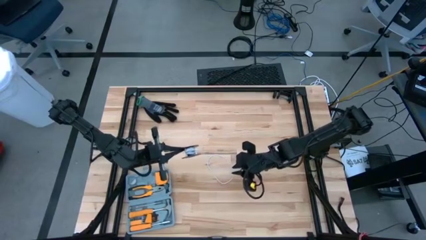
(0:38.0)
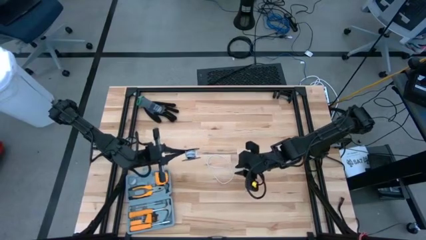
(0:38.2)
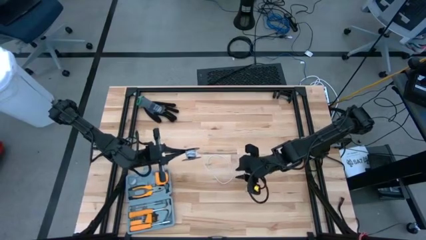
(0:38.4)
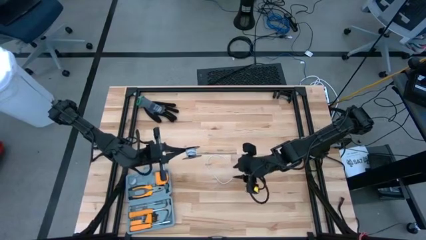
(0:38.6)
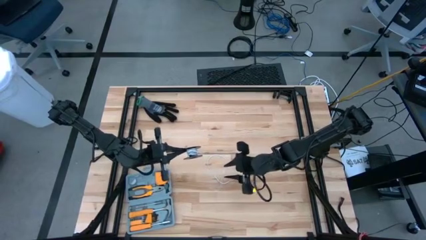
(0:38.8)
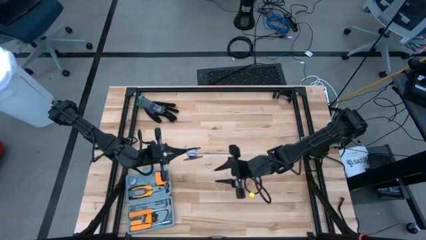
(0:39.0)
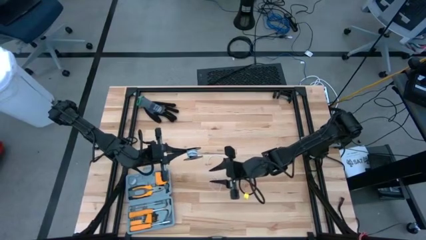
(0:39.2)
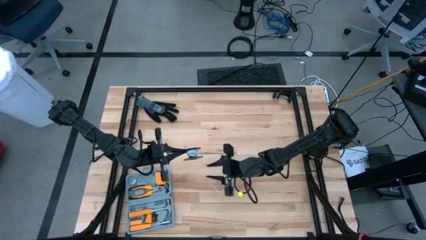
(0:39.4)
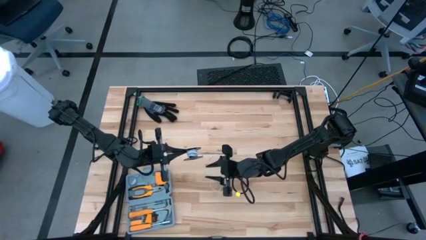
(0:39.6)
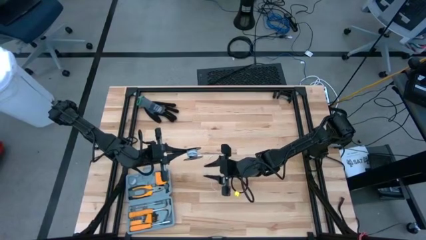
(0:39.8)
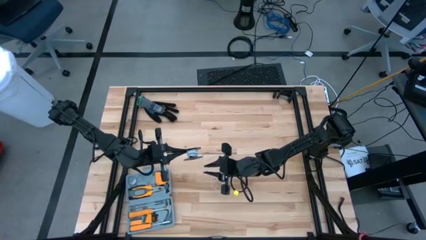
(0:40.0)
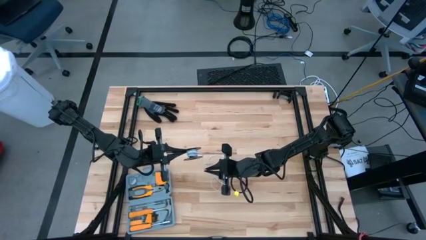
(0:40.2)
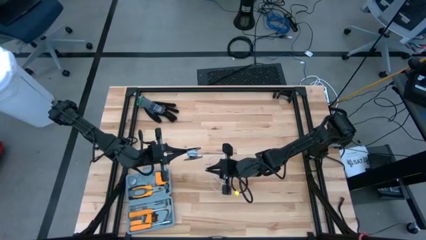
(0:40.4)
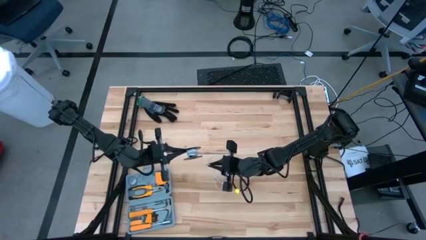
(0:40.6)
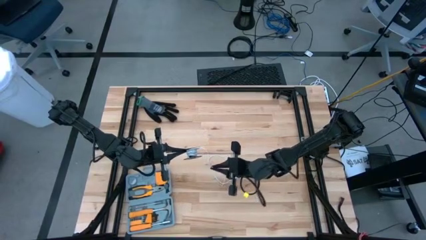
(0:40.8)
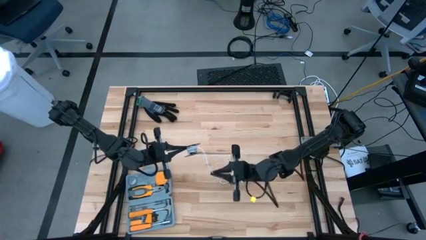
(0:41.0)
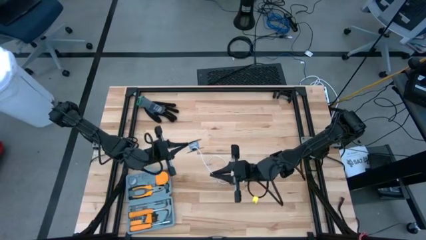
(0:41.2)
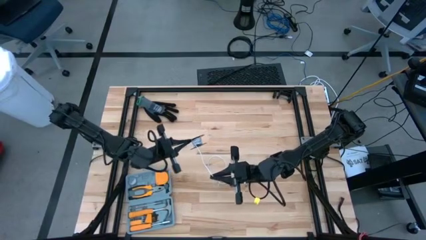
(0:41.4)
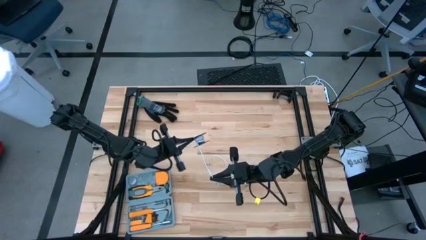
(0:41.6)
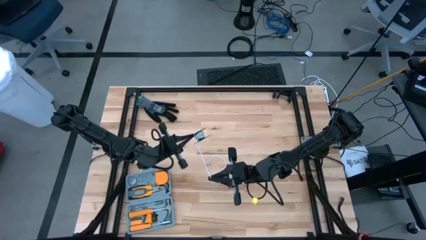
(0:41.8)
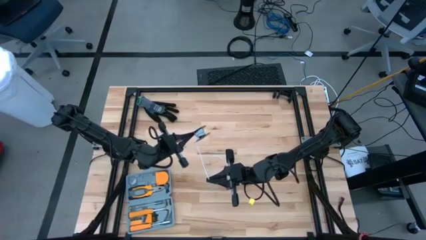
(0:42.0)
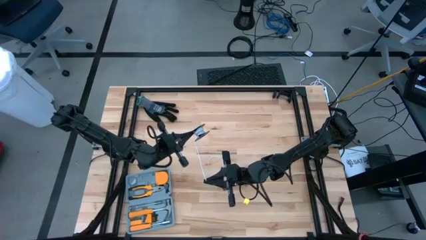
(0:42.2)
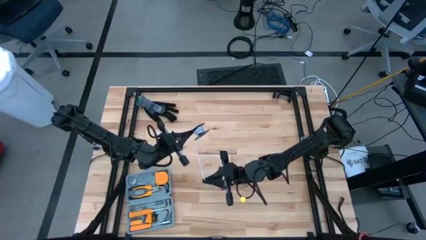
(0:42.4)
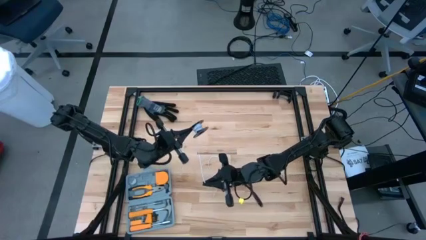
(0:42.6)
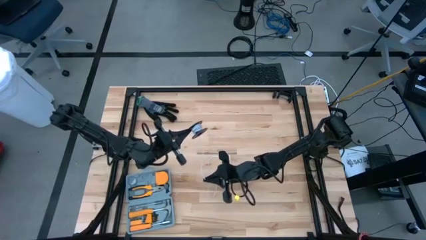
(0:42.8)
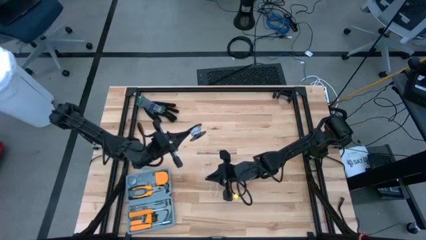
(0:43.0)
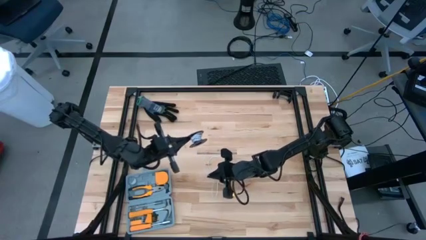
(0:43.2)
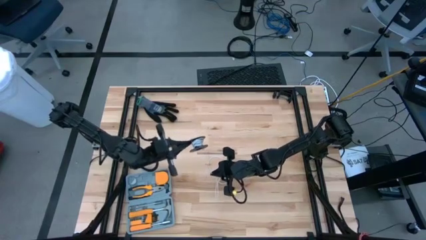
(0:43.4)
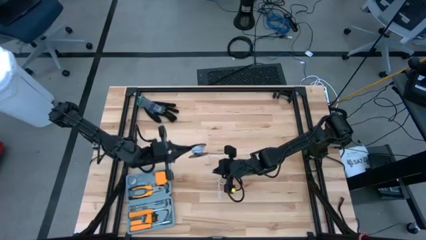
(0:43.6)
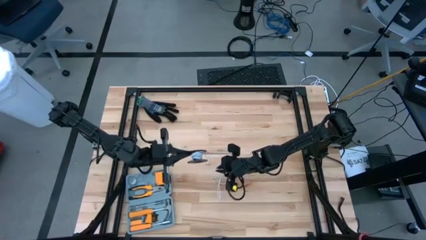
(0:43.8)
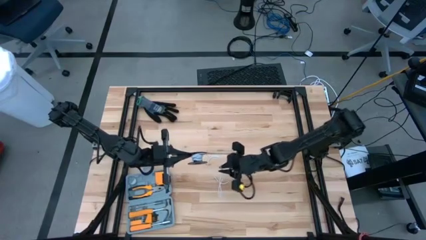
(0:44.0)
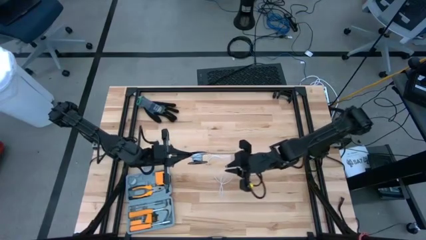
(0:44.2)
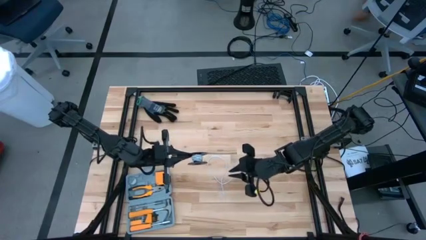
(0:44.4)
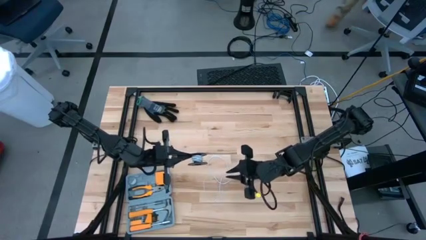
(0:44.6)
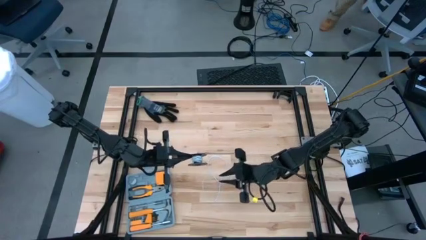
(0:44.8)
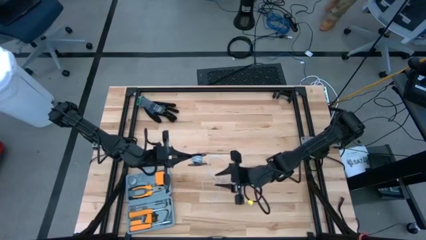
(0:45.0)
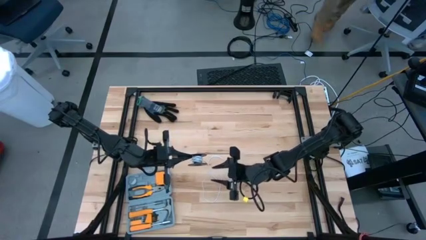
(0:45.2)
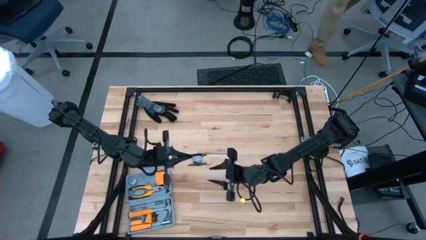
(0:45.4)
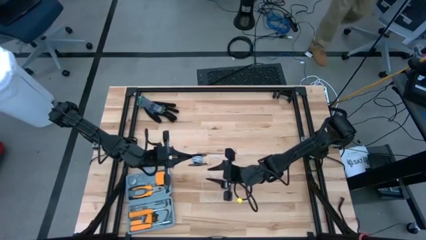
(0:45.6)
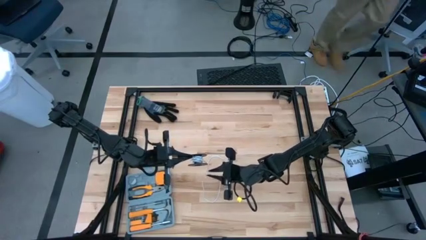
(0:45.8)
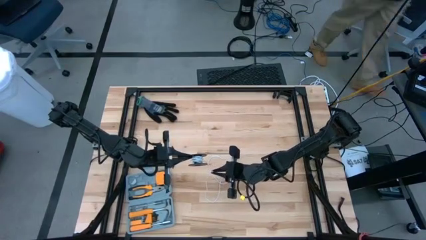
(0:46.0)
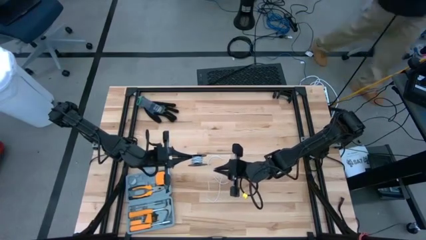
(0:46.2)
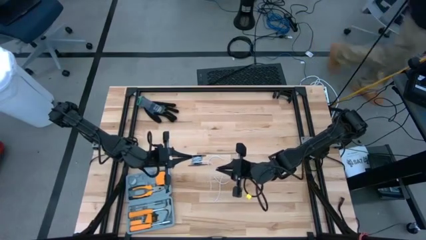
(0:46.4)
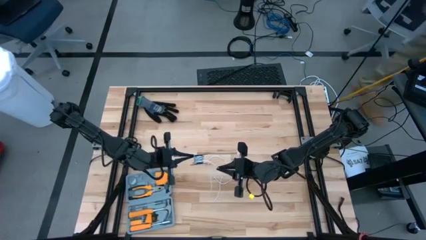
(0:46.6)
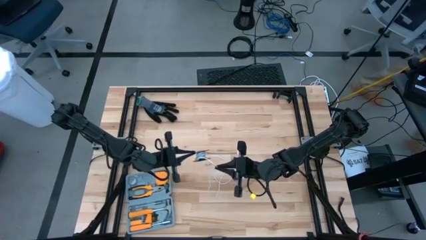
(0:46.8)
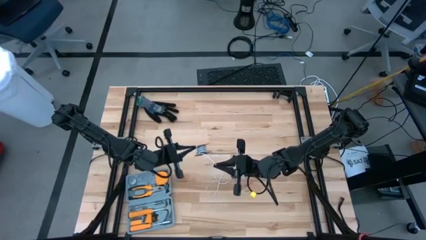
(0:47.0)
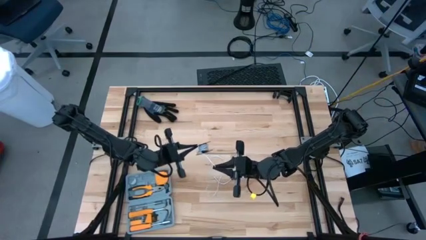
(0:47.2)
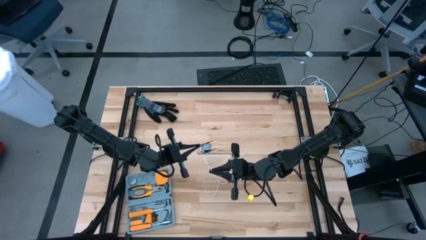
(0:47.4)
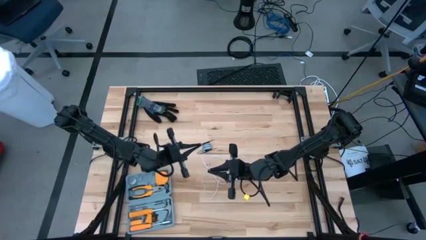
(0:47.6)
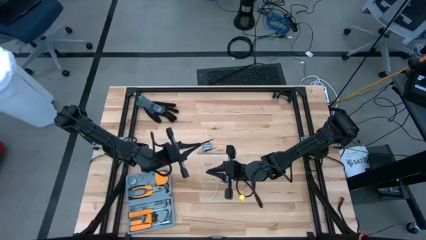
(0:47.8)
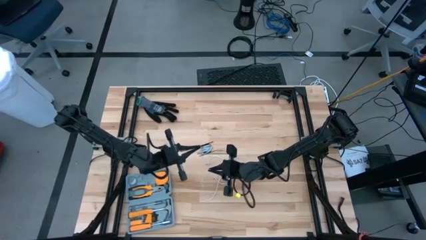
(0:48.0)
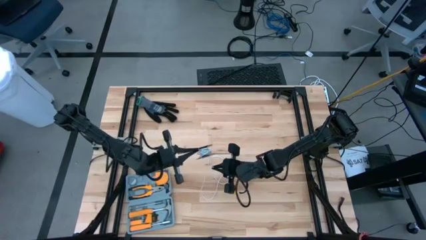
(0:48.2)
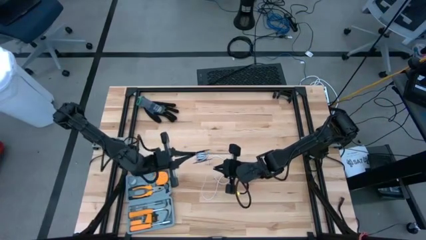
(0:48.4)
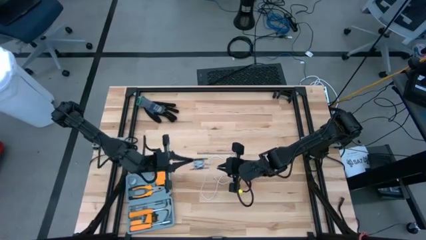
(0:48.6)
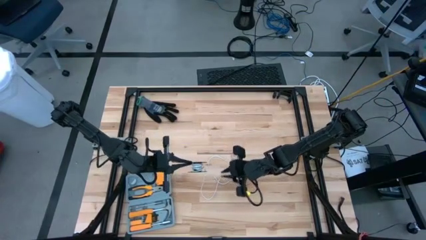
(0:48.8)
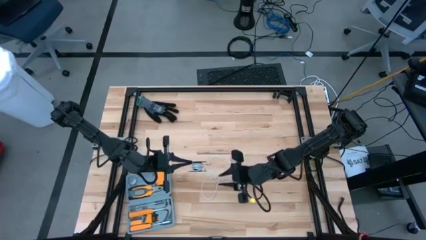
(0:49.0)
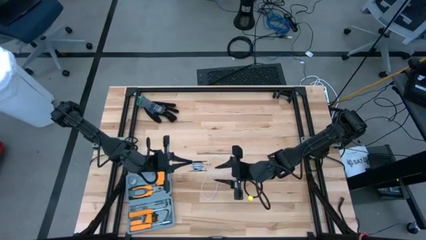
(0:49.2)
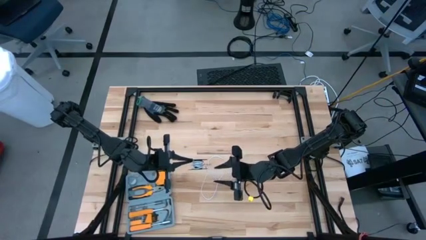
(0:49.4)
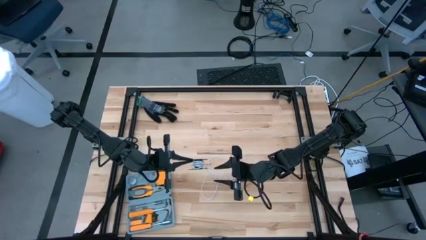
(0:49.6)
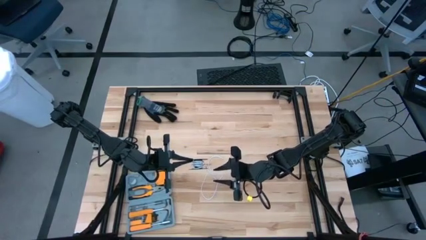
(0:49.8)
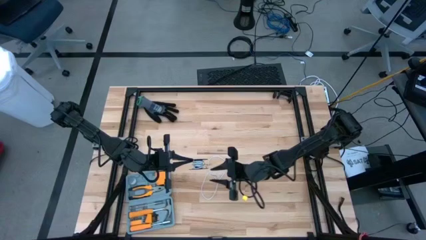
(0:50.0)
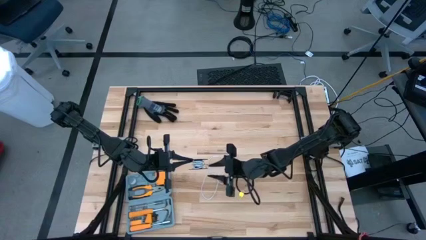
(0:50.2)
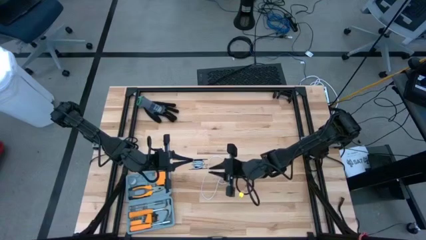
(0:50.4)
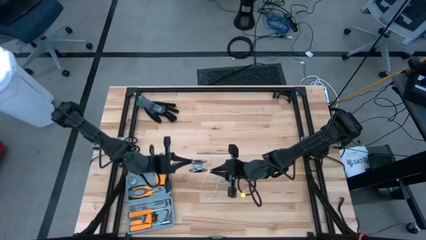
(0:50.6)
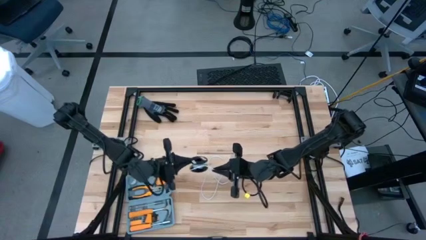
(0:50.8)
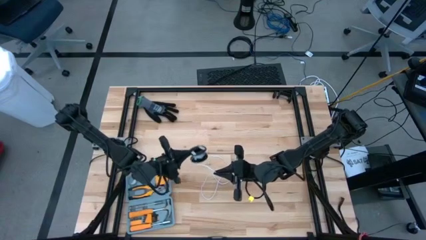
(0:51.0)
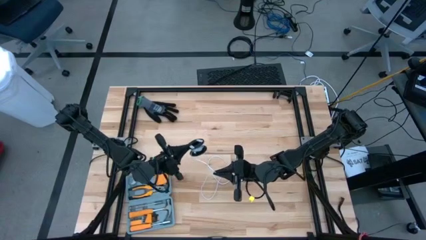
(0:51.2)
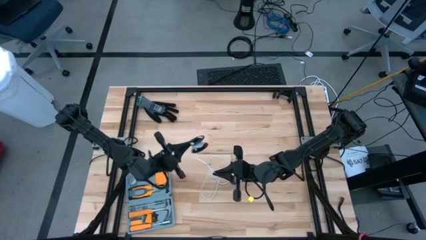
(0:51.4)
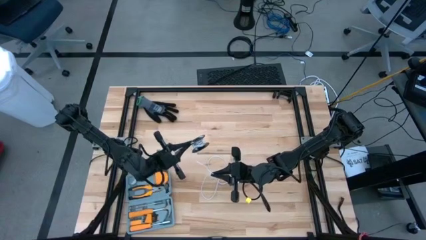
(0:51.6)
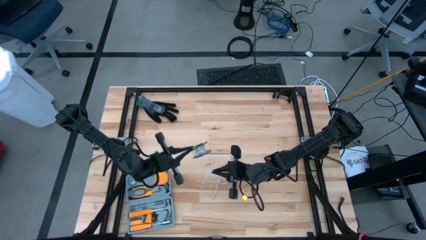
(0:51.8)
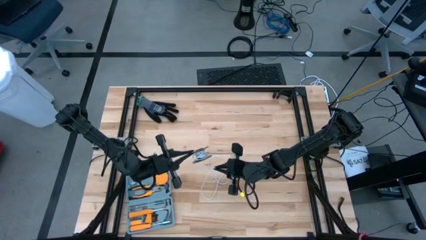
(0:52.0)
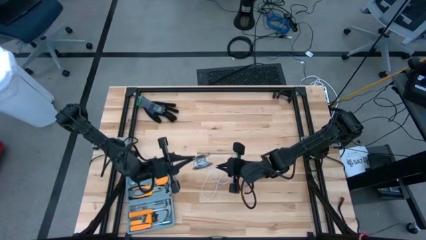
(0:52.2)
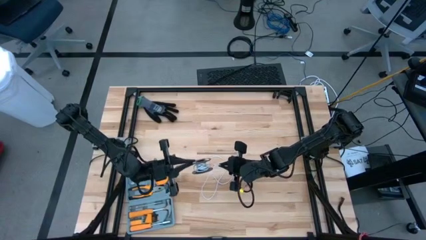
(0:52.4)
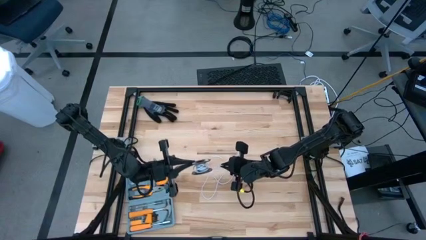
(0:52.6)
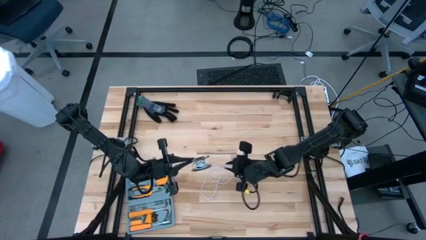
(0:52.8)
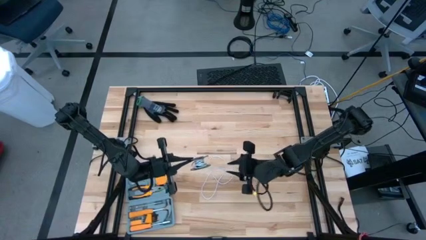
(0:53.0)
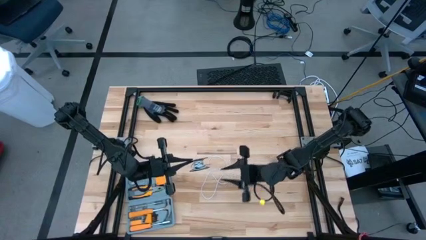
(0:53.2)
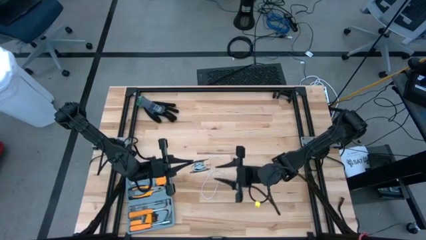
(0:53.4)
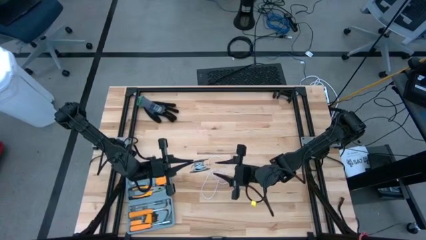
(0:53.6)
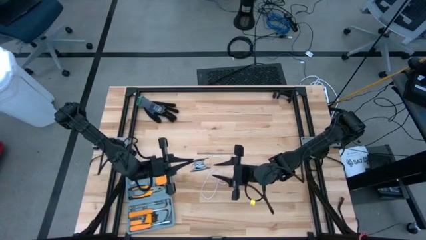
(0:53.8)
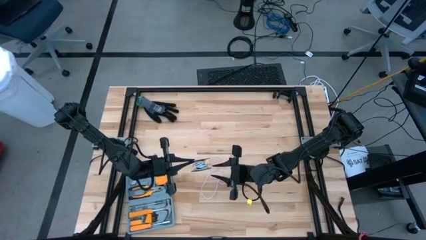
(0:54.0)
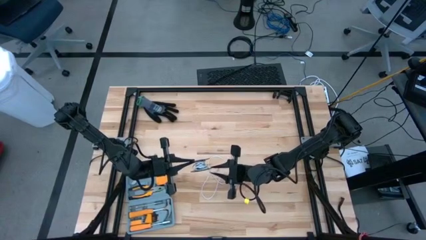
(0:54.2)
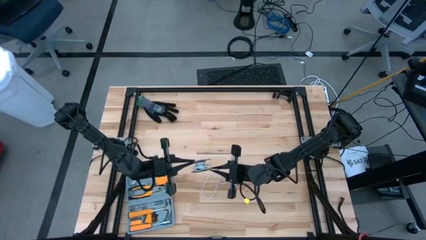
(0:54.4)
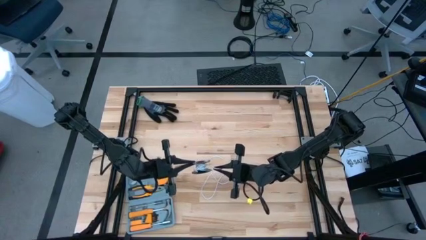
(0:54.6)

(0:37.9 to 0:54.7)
Task: Coil cords
Uncoil the white cable wire from the spool
